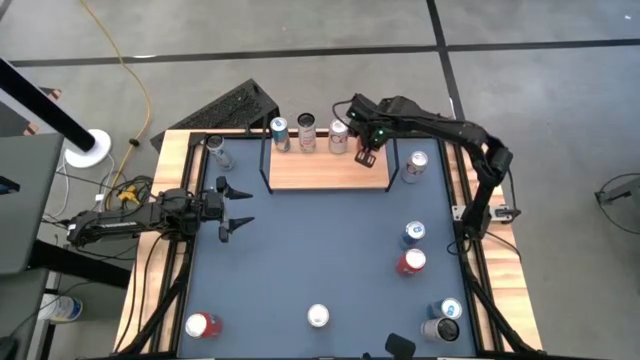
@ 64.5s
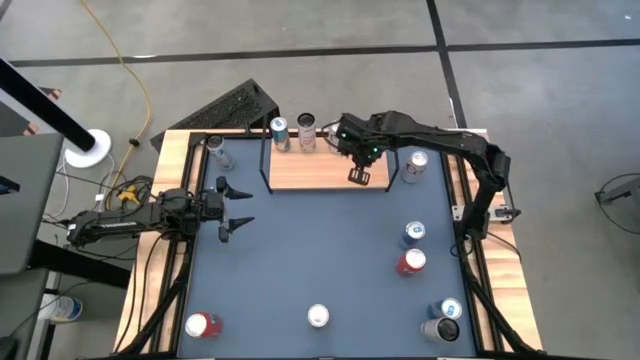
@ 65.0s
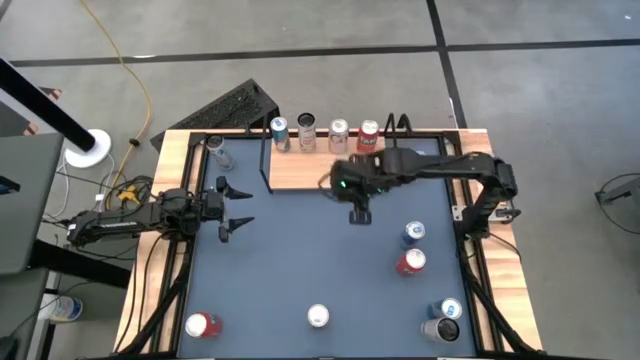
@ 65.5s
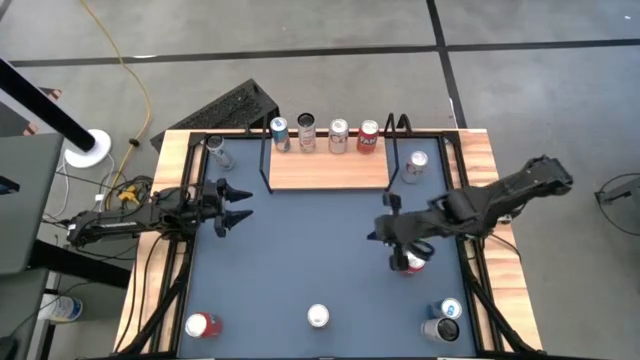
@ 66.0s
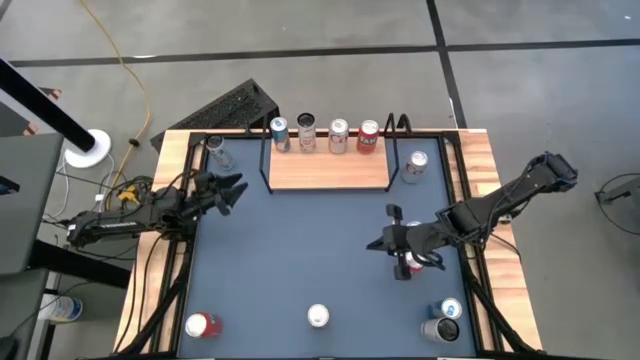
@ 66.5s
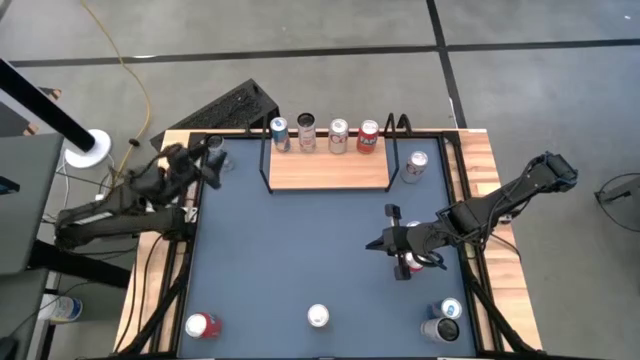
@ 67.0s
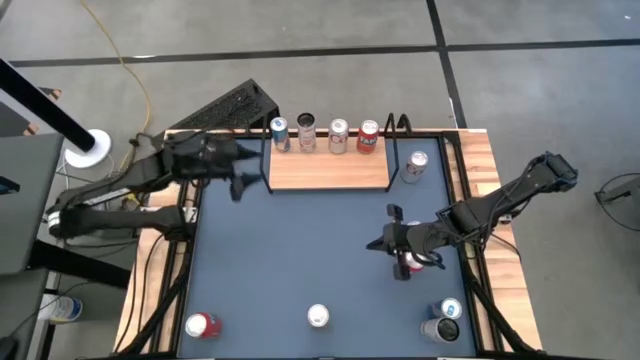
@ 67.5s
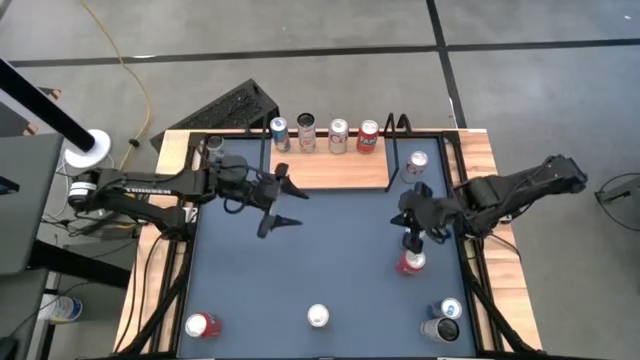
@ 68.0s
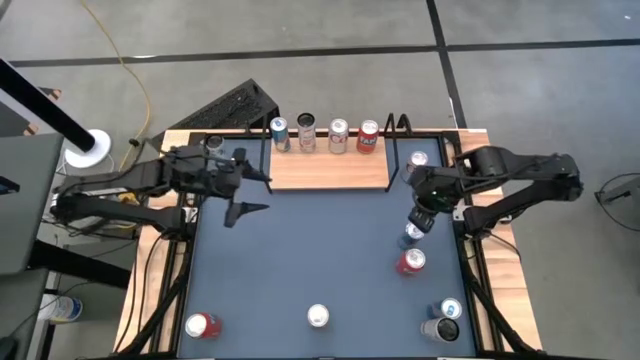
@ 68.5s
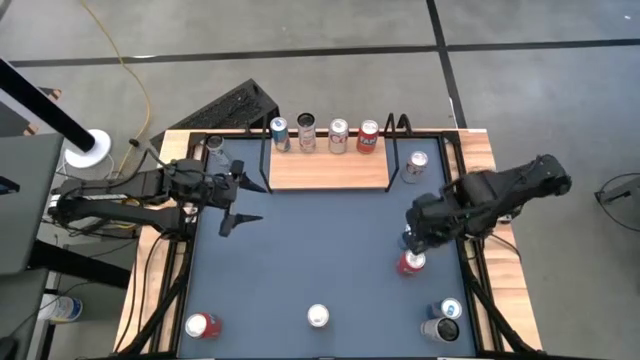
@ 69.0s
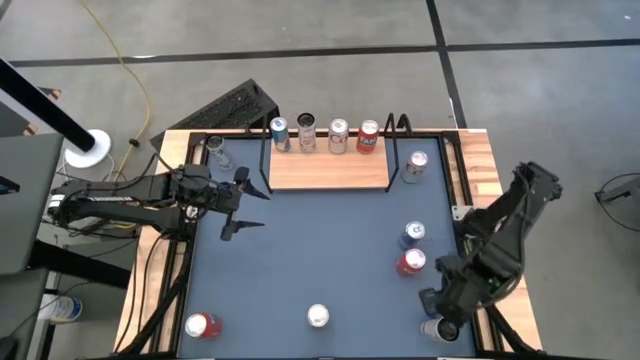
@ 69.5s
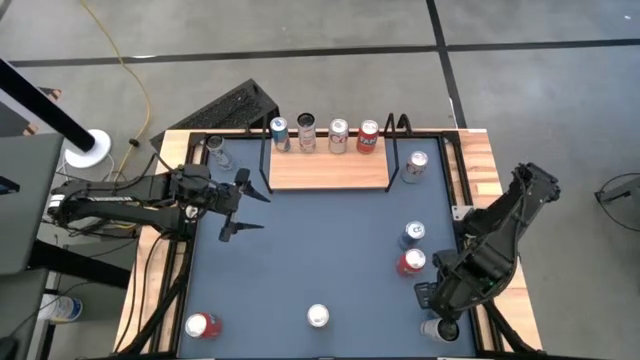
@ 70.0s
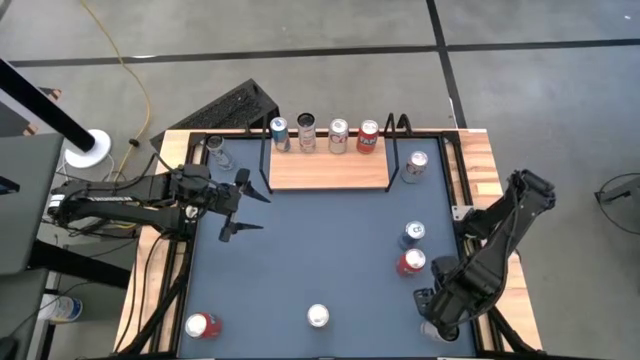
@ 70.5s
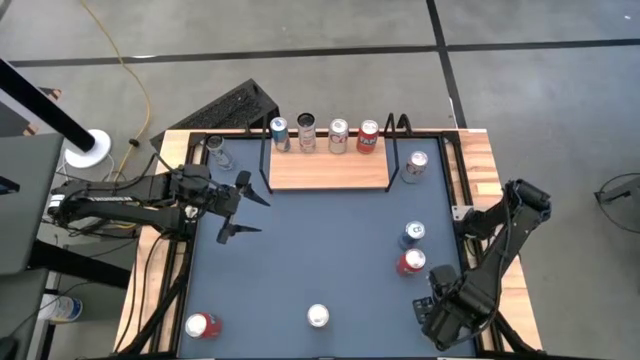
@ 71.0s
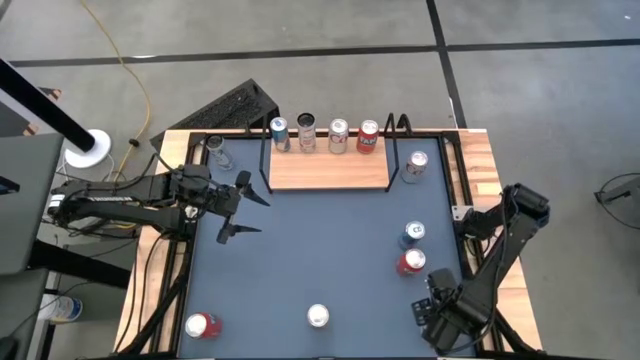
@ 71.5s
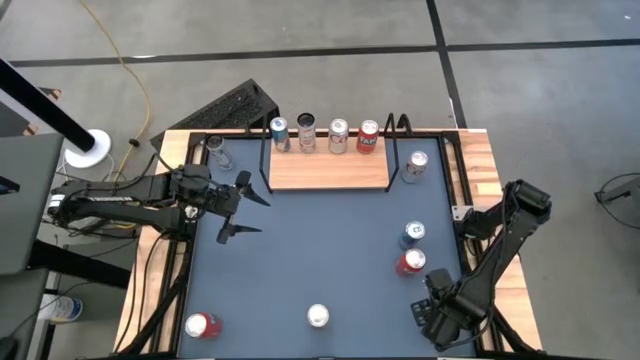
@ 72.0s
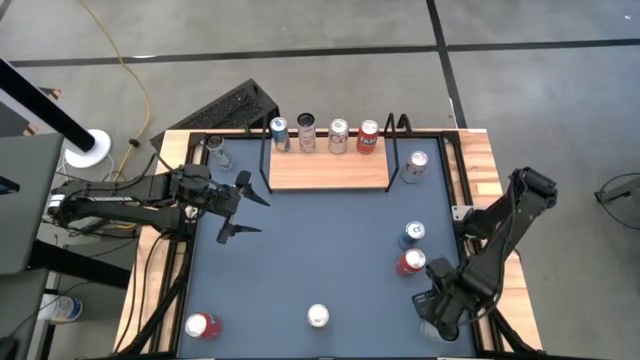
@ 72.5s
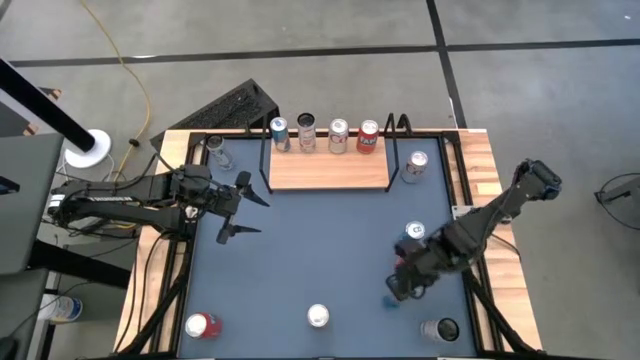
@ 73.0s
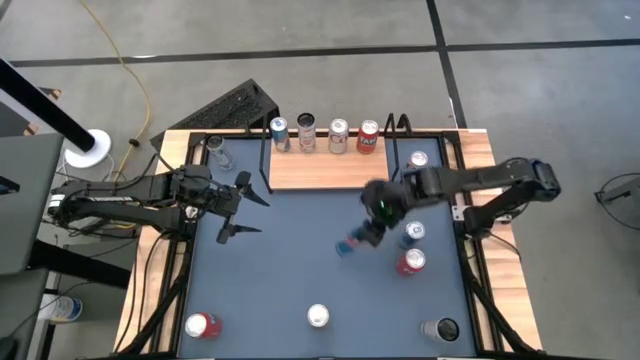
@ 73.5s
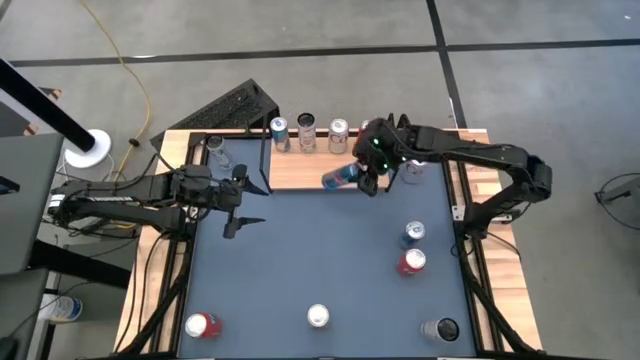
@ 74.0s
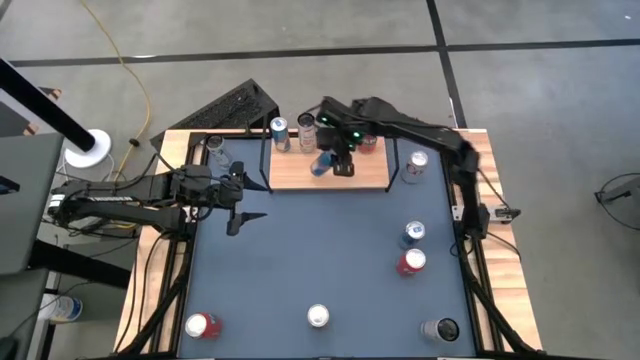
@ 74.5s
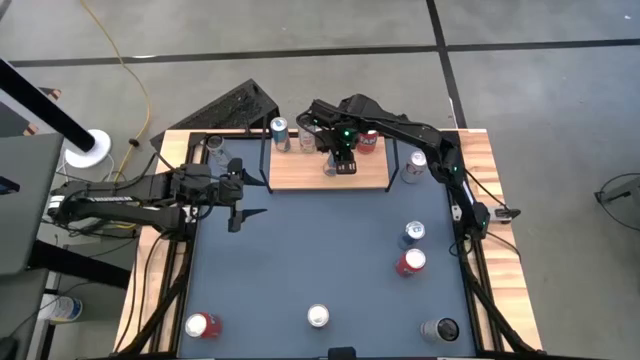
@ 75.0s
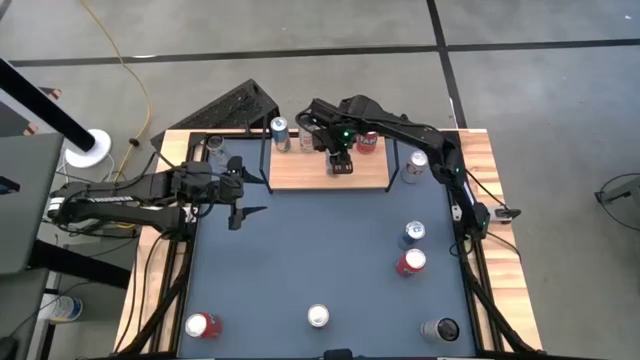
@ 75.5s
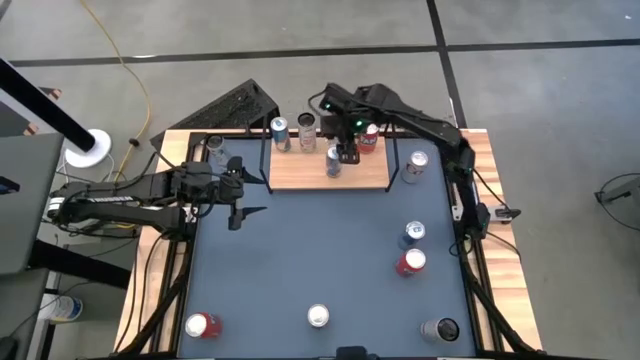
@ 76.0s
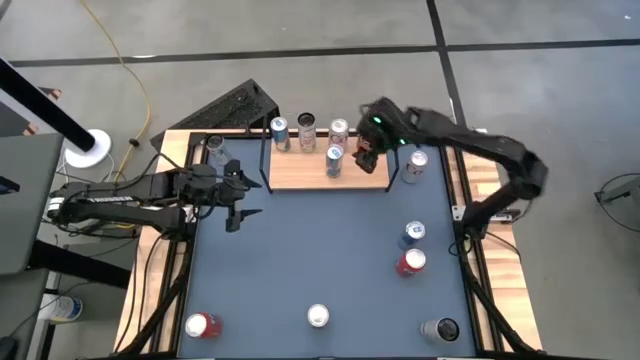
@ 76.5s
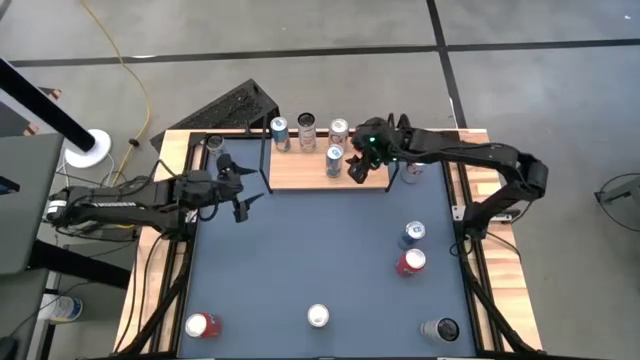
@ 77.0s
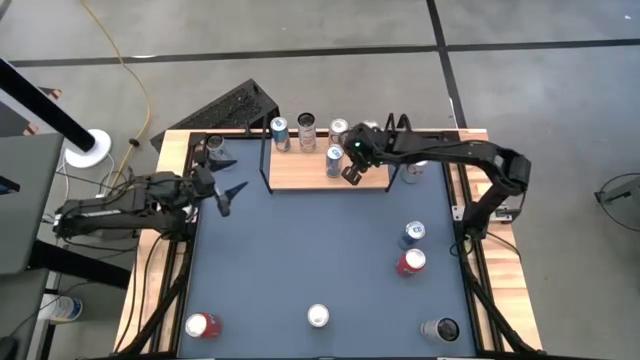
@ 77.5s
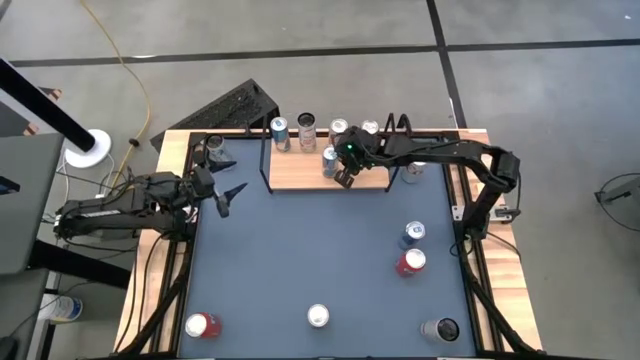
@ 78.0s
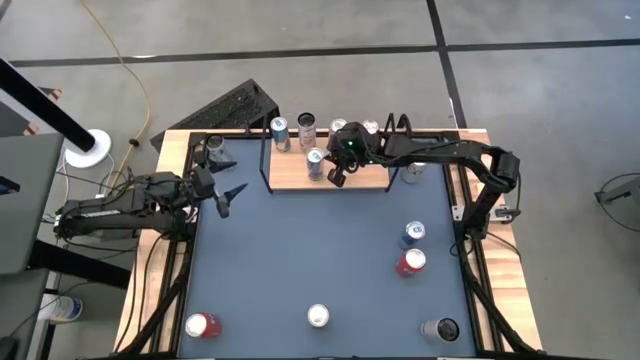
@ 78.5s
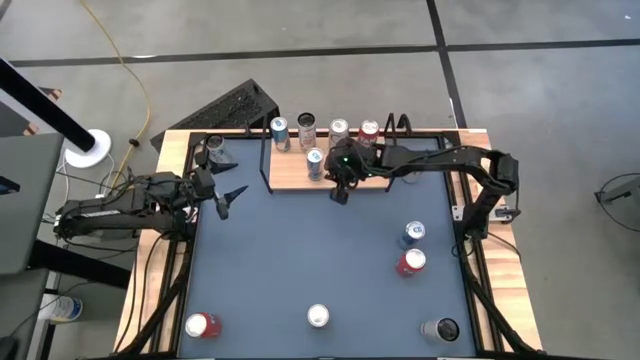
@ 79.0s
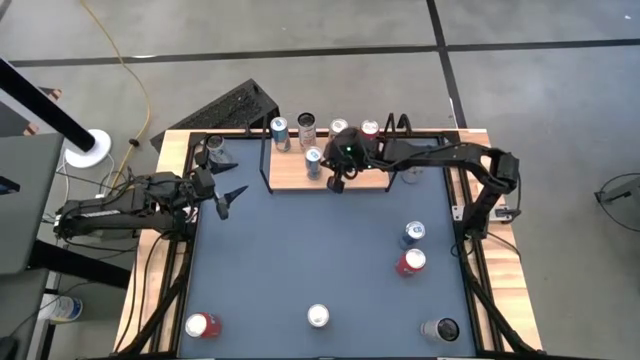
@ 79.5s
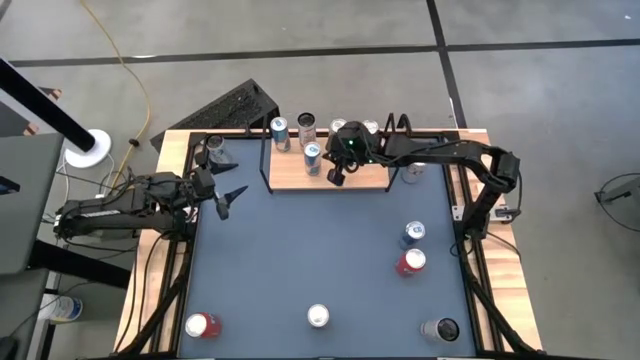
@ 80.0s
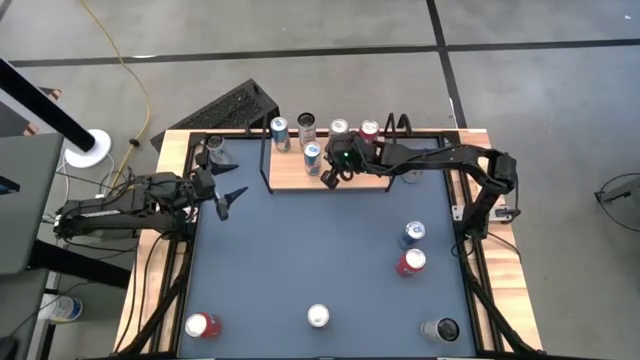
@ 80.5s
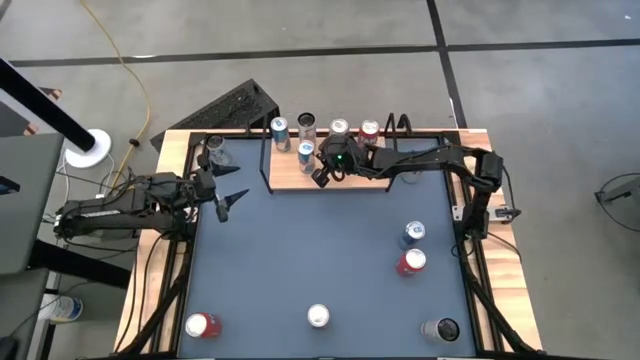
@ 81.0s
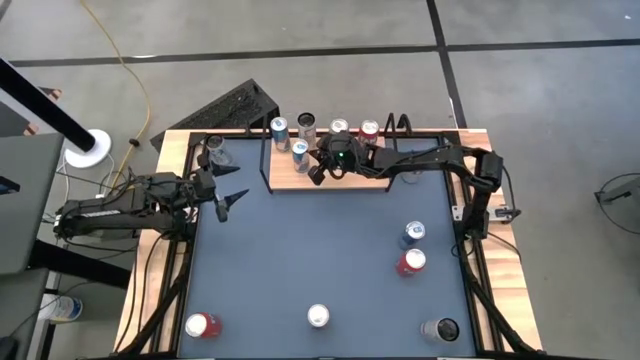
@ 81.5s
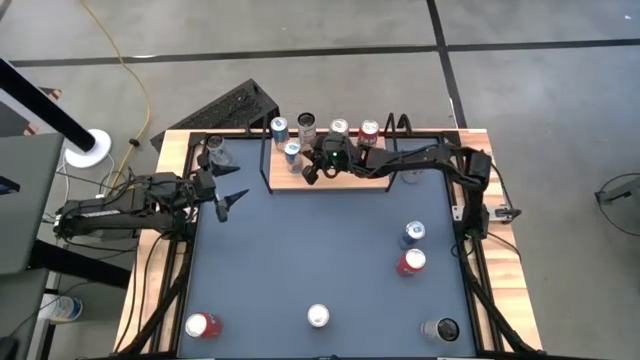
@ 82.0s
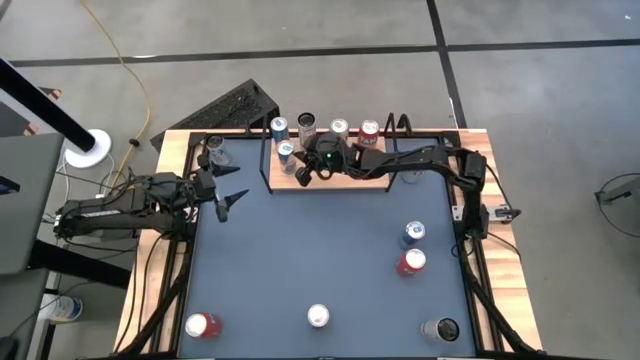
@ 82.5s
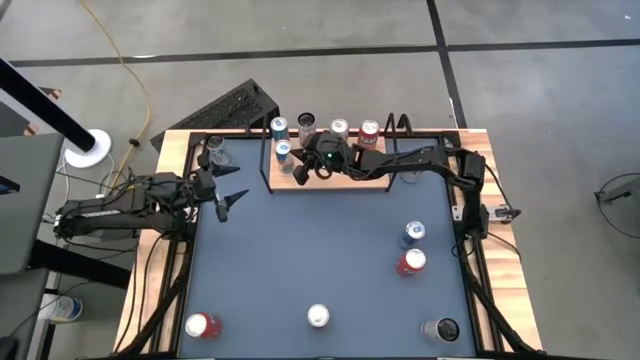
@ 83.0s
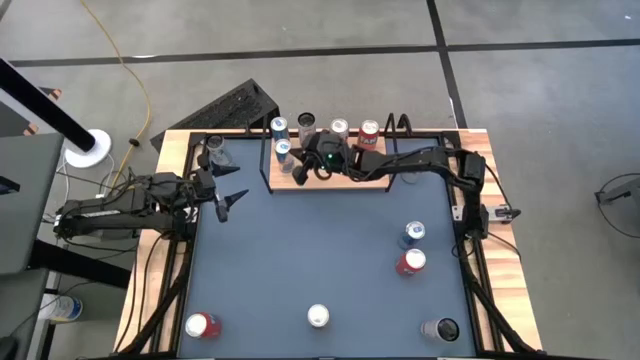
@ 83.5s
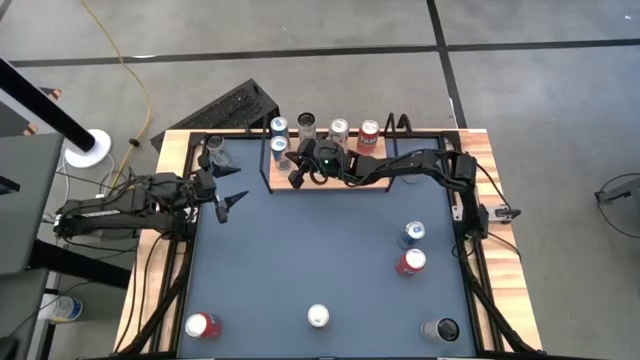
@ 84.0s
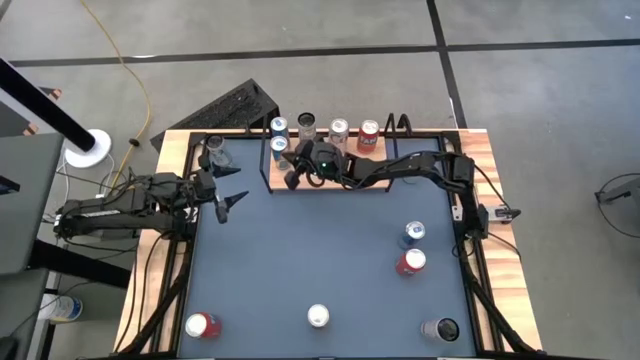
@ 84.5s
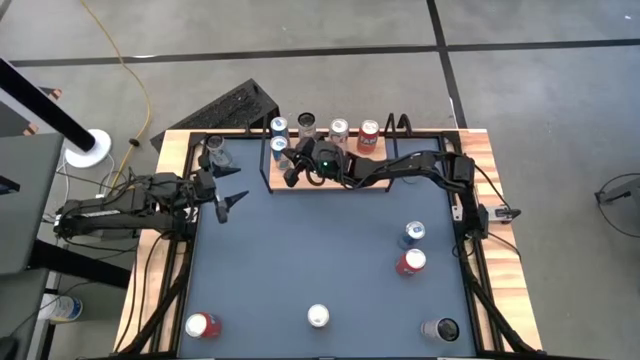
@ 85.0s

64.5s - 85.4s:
Task: Place canned beverage on shelf
Put the bottom blue soda can onto the shelf aligned with the other blue soda can
